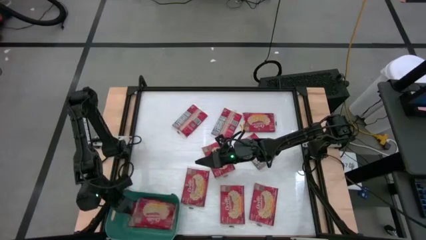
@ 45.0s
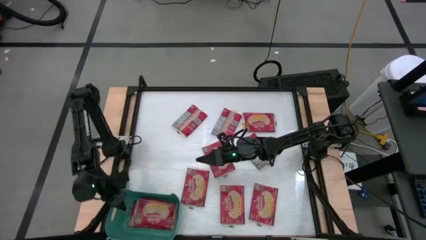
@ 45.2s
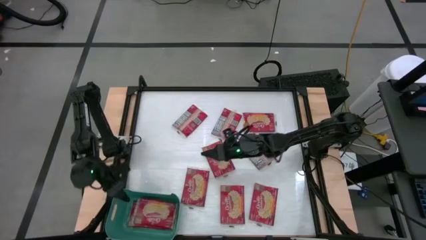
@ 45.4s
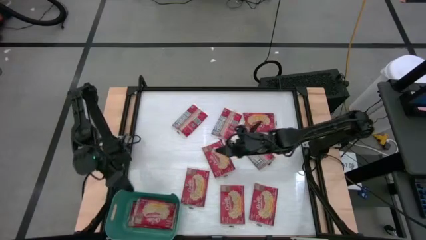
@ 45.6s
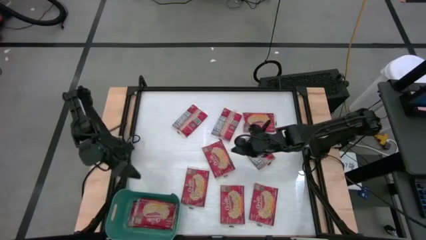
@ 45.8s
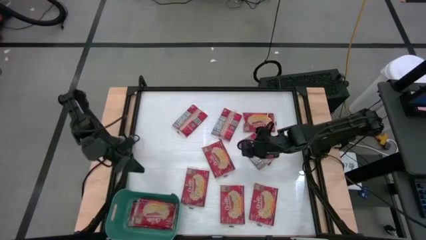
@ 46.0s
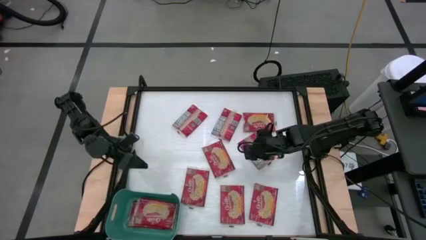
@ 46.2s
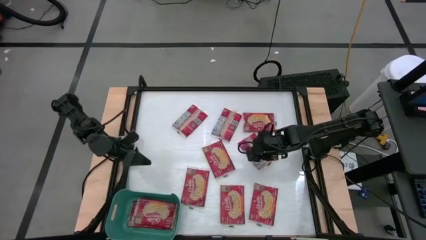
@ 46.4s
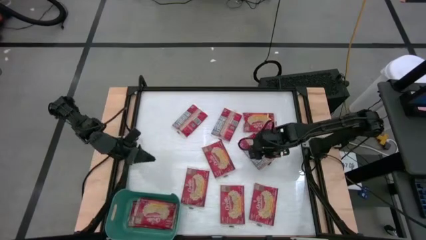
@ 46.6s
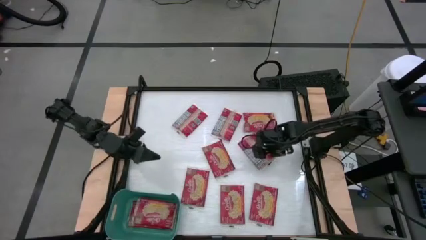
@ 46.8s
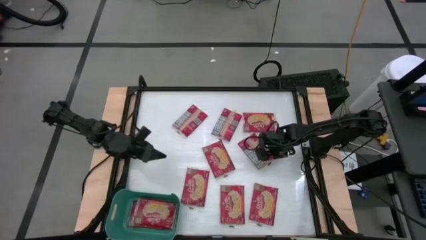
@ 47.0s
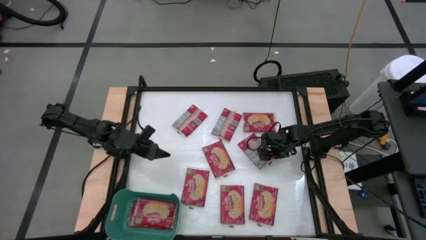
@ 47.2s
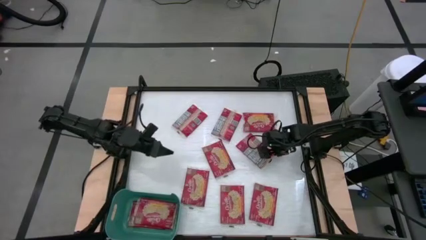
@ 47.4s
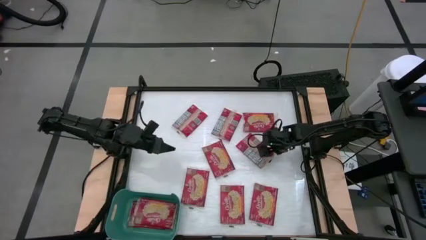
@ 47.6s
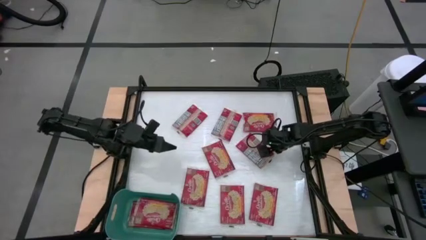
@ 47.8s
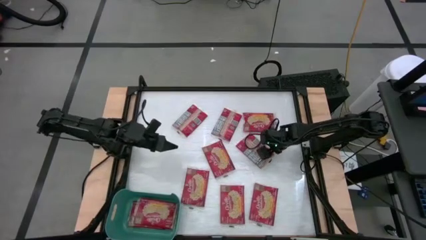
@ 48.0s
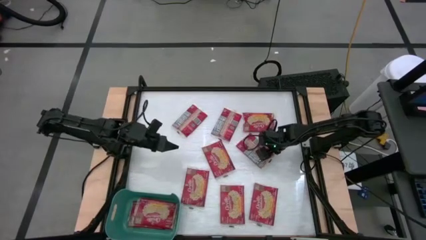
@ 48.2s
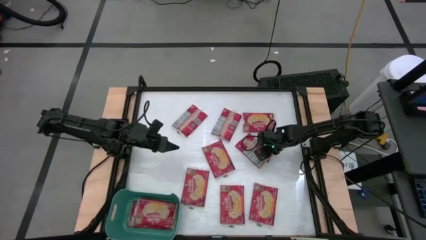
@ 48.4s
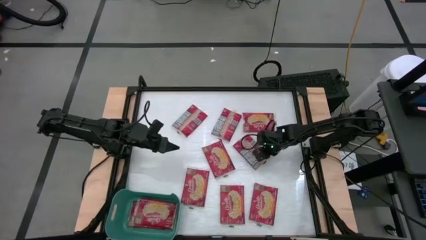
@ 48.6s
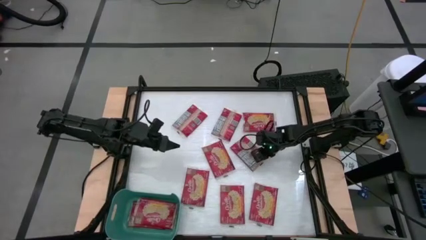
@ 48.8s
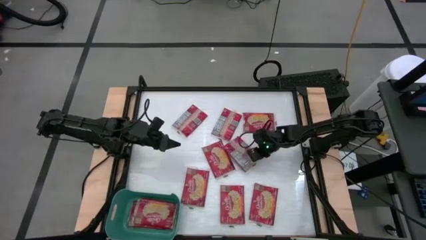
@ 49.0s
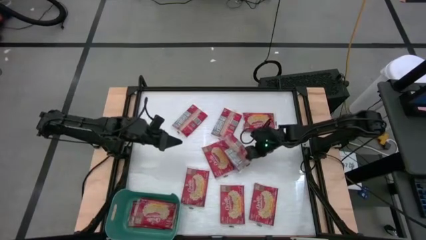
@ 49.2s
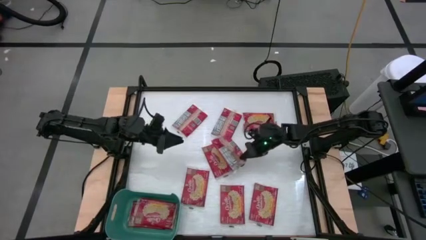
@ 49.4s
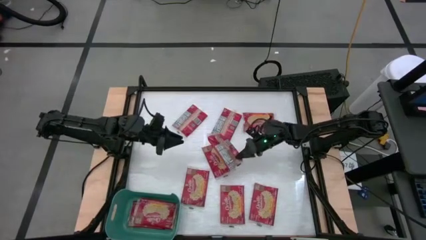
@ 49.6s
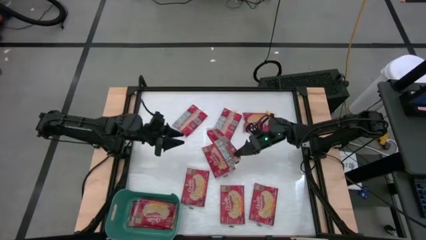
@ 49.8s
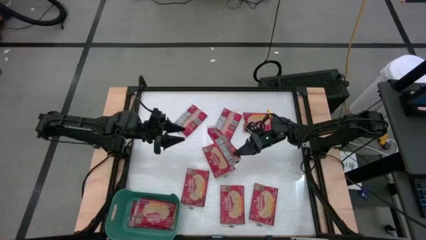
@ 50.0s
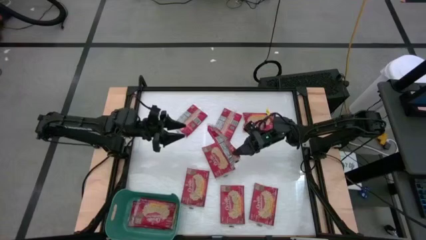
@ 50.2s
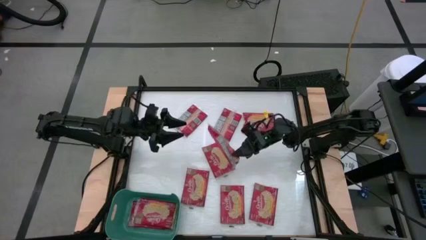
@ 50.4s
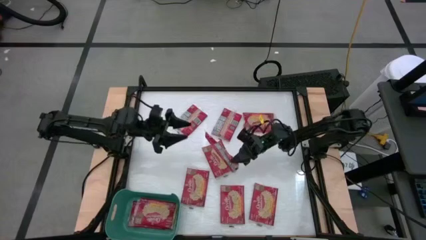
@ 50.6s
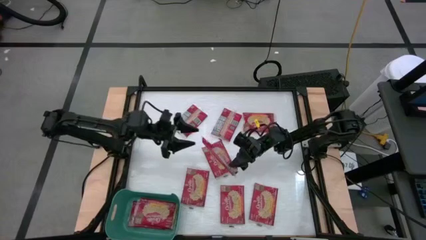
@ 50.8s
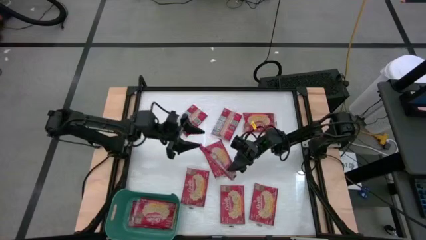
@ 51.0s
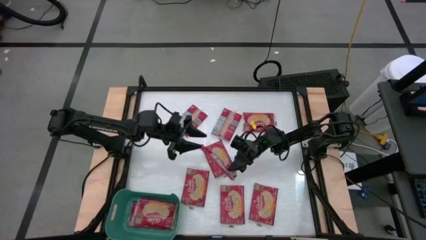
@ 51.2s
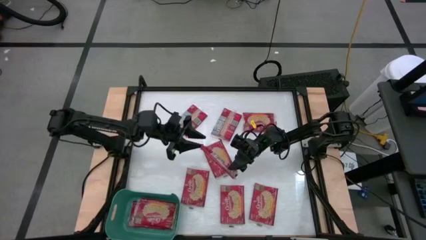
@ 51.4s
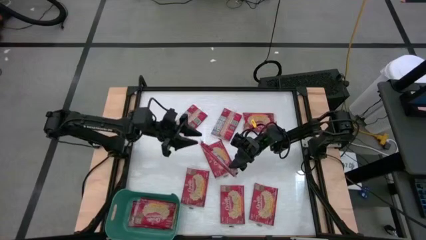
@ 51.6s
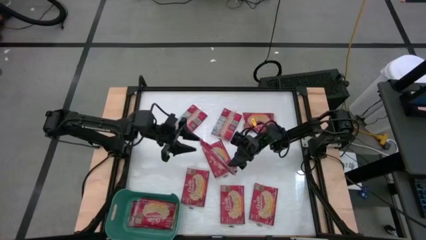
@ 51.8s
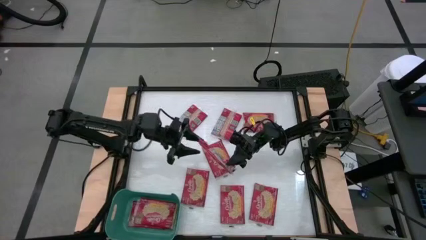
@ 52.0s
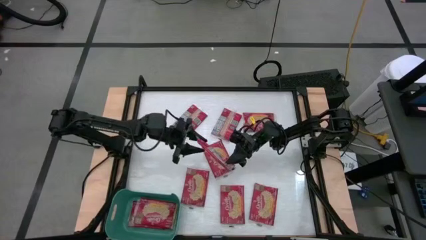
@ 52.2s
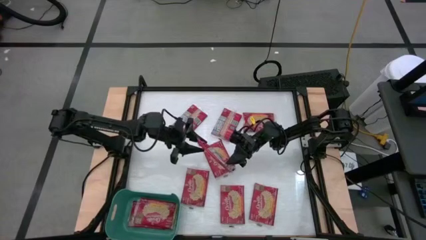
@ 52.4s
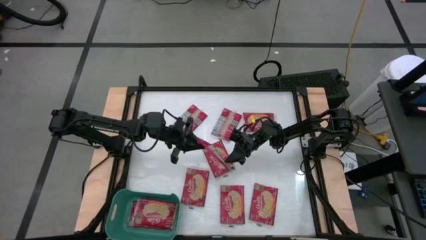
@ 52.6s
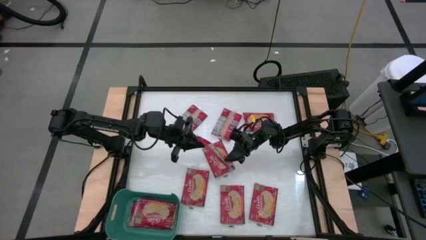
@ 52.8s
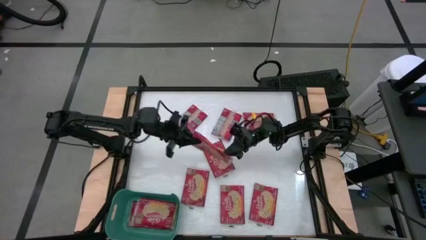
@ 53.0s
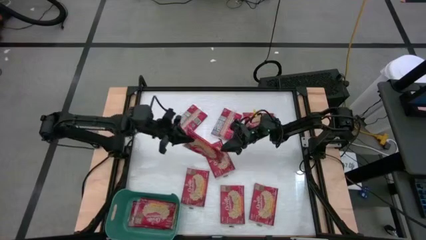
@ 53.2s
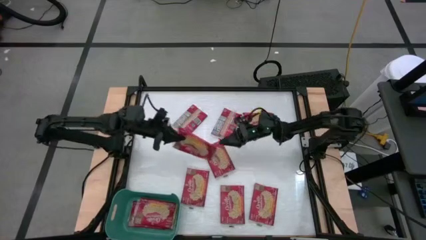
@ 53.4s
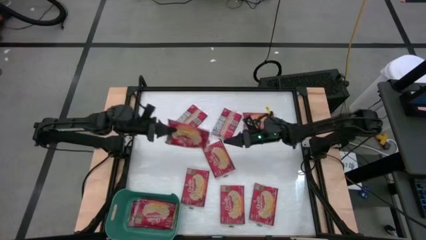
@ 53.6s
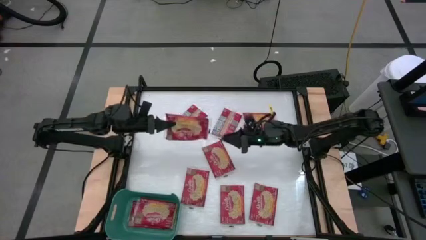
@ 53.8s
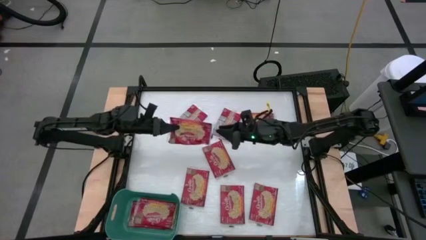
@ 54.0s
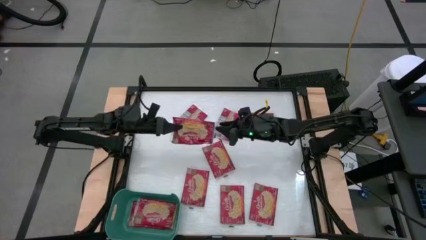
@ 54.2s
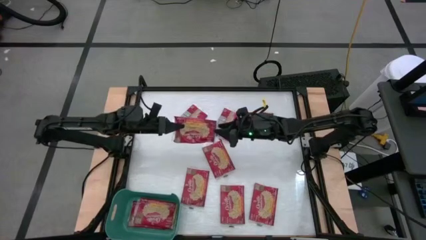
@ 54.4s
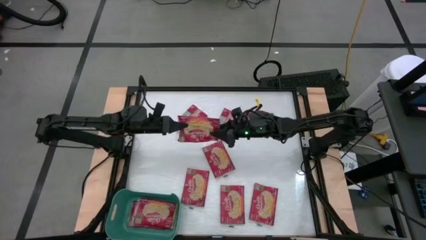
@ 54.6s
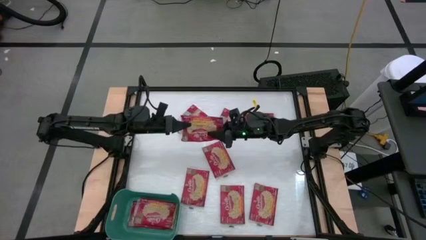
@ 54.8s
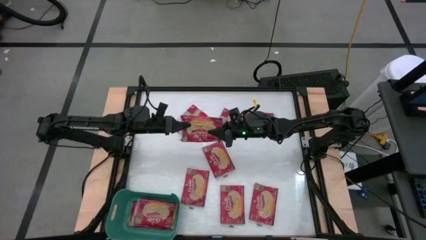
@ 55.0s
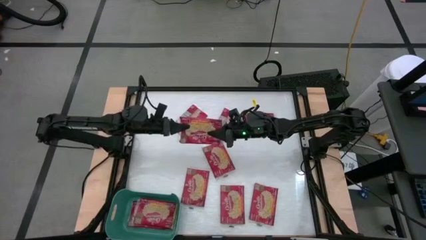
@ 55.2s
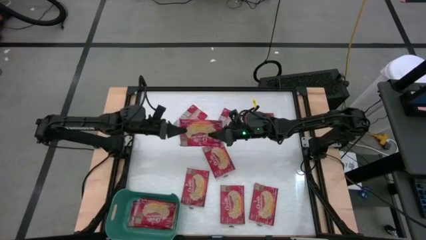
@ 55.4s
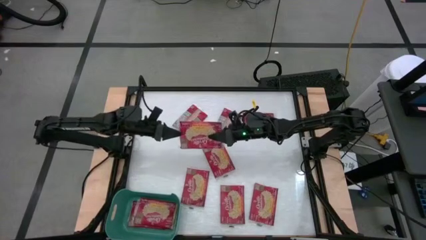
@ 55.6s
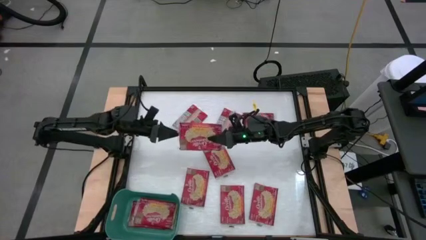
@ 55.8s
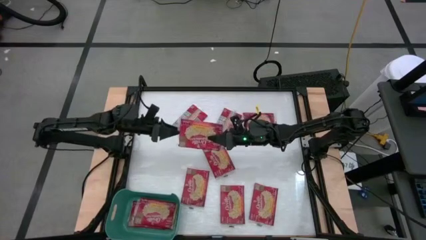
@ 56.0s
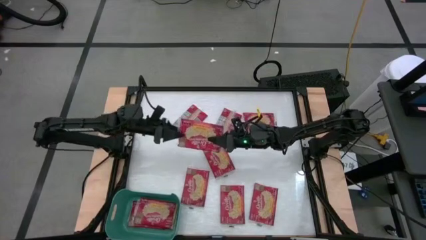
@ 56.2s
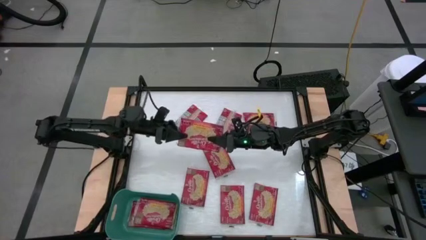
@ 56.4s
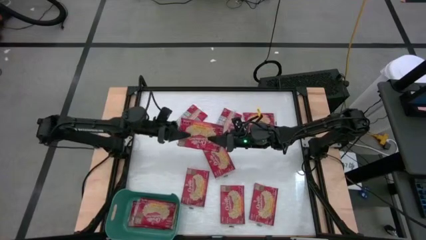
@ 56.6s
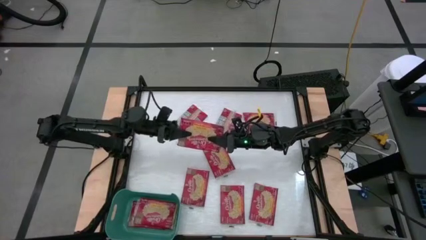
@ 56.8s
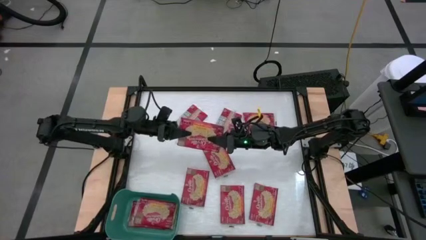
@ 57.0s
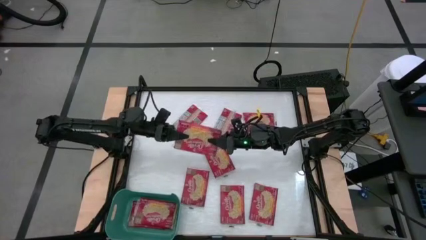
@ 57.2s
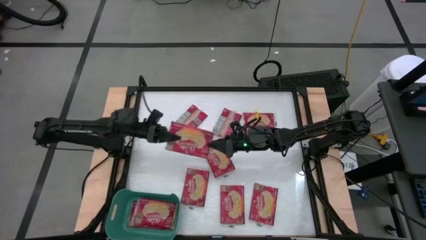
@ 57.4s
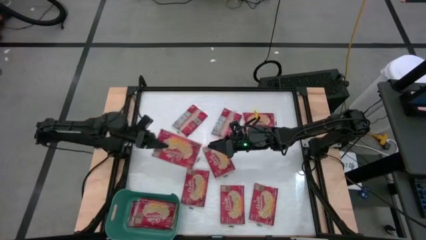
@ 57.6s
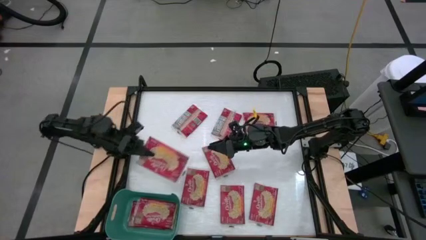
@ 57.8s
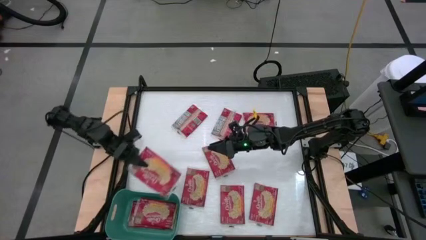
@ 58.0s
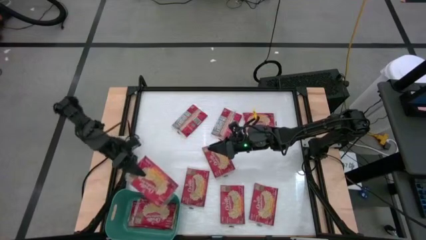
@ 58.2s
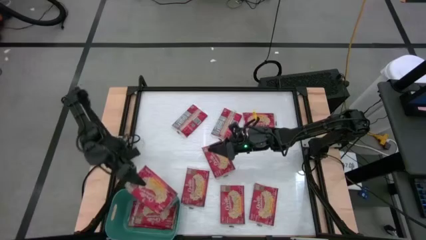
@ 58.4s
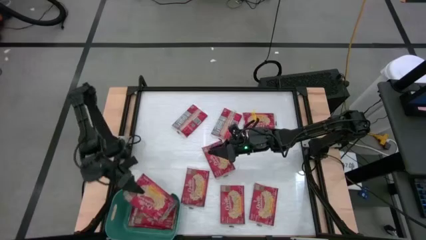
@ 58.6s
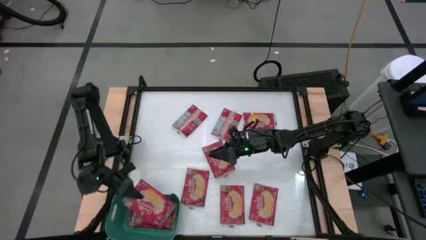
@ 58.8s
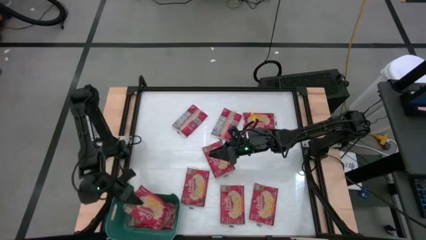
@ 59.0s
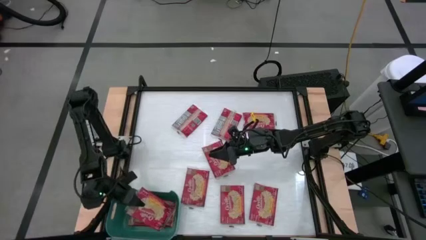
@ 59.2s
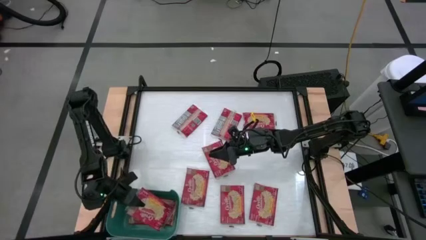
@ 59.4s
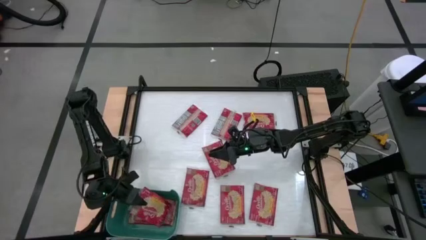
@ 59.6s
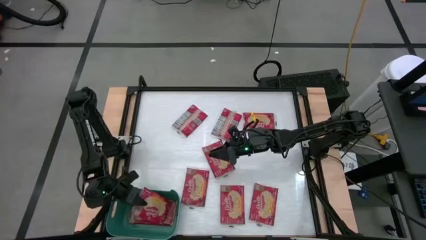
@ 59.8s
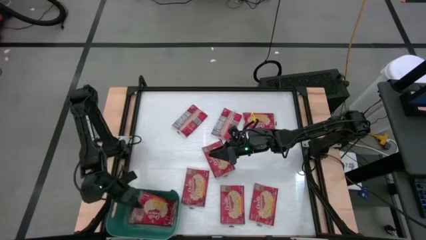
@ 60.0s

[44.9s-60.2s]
Task: Sort popcorn bags into baskets
Put the red popcorn bag into the green bin
